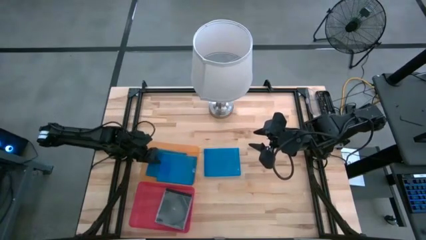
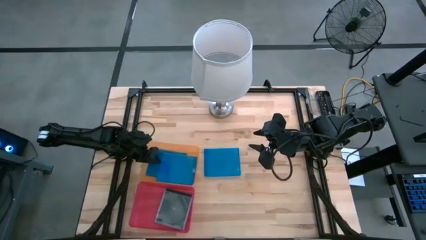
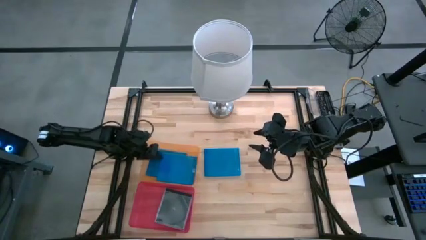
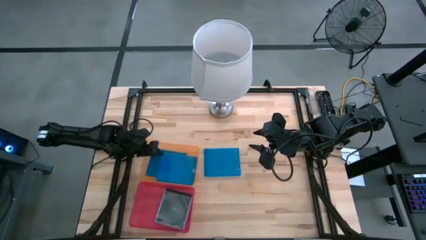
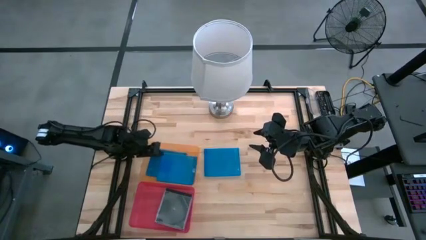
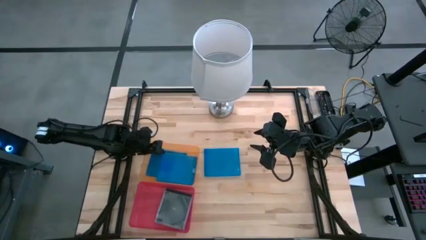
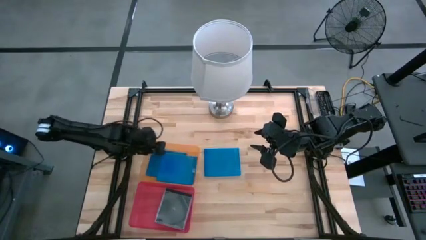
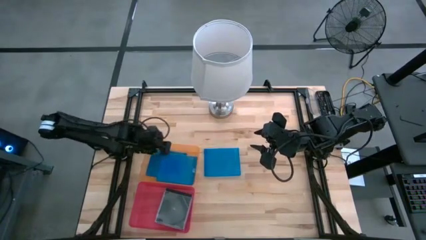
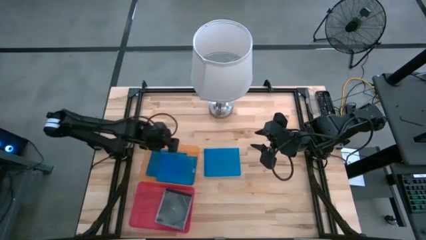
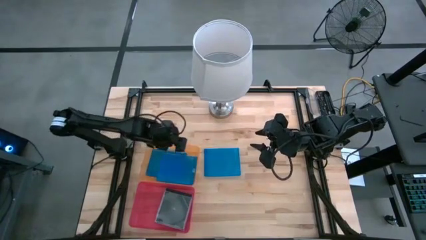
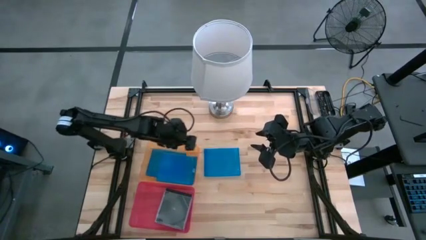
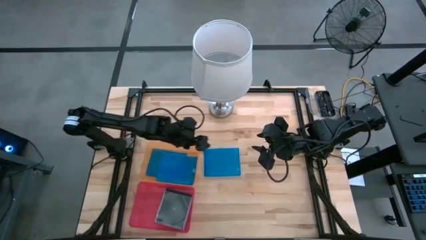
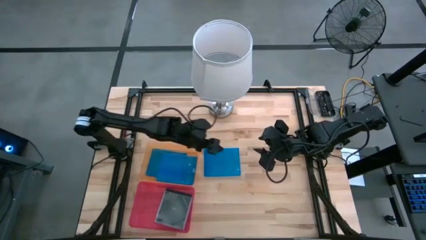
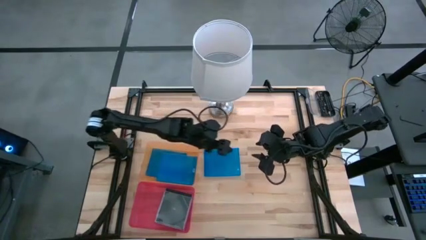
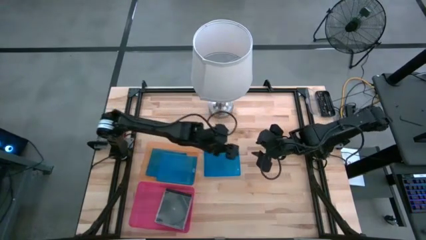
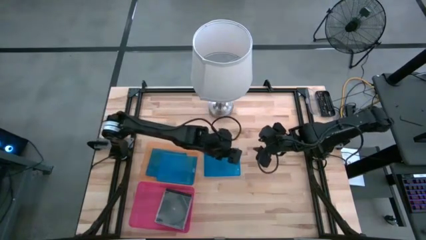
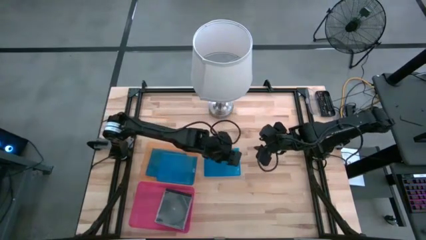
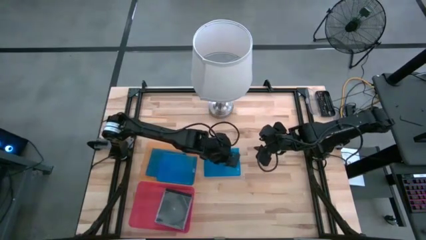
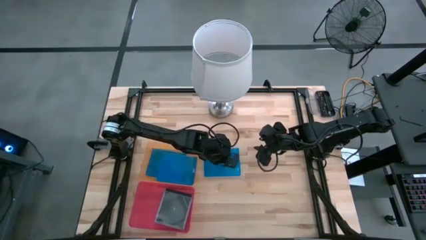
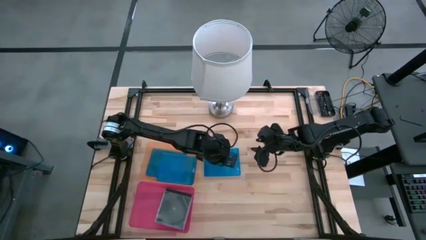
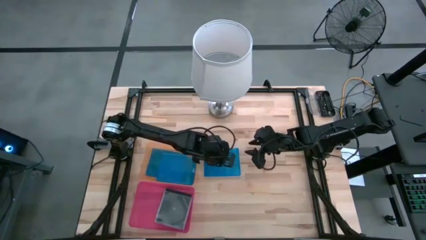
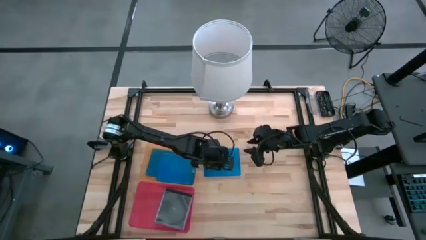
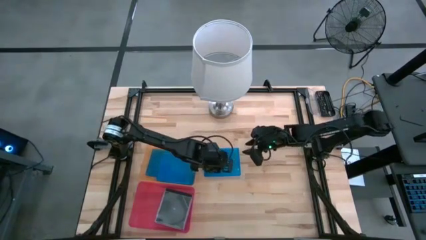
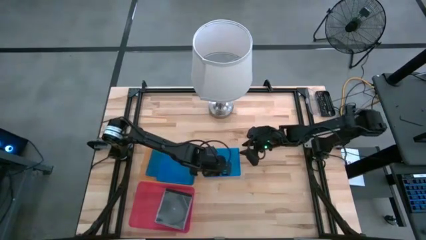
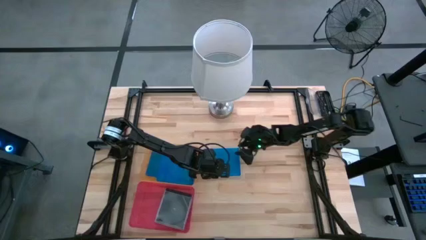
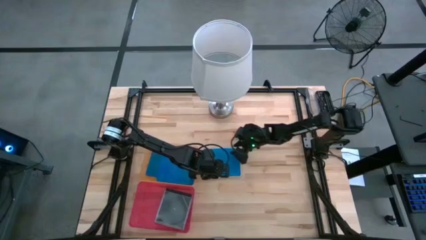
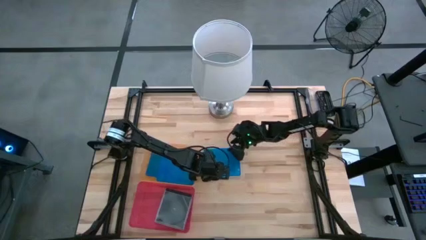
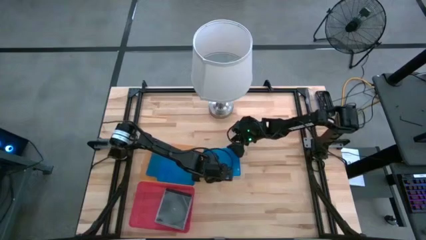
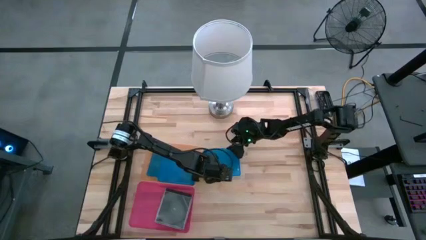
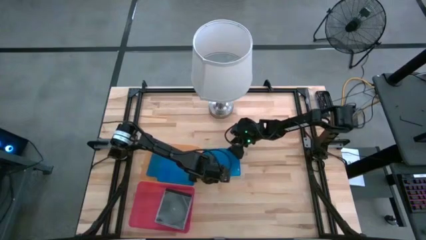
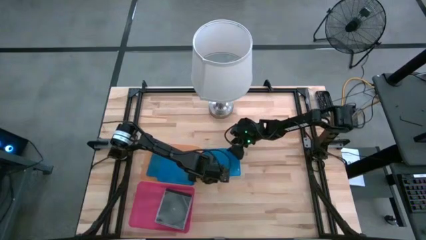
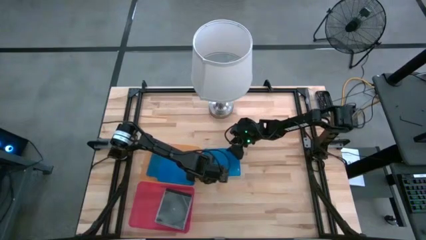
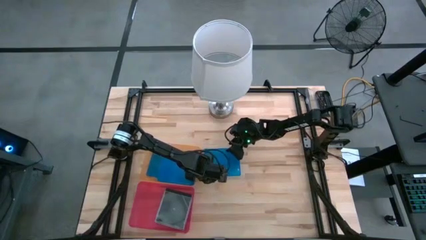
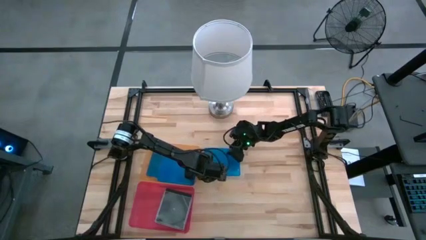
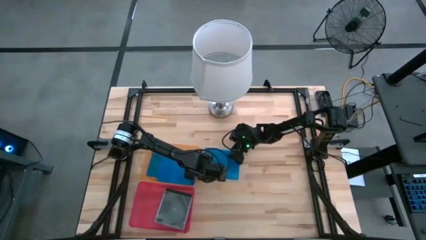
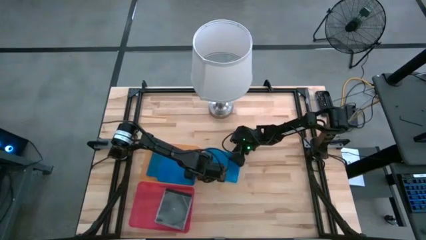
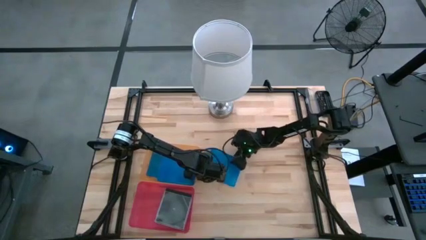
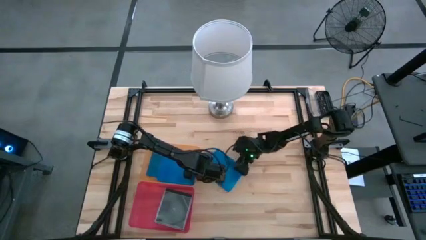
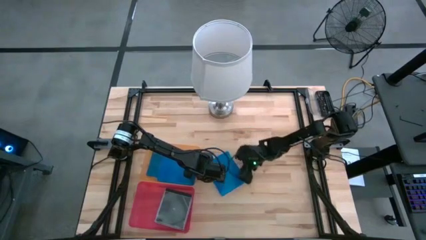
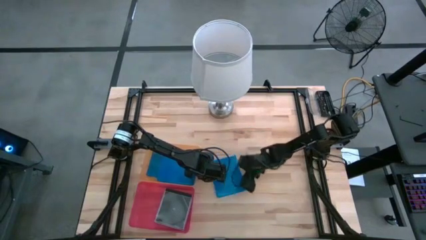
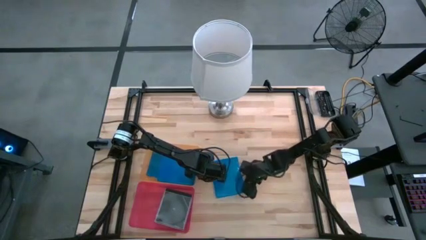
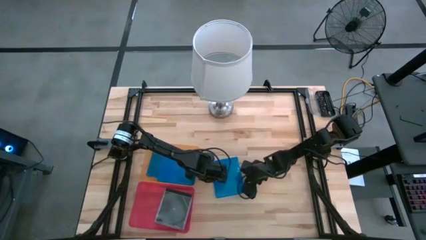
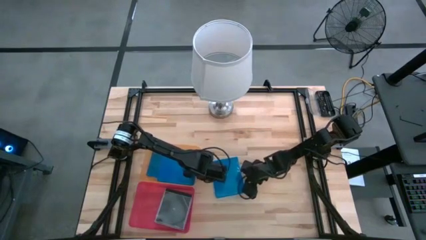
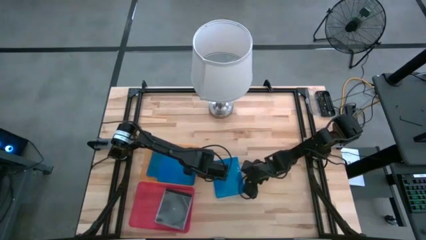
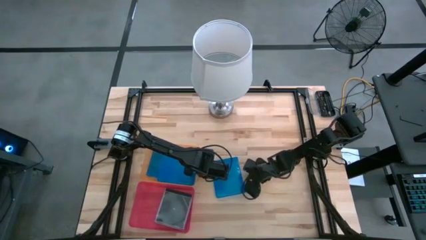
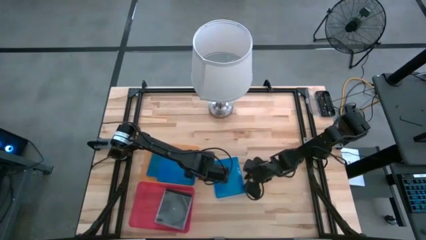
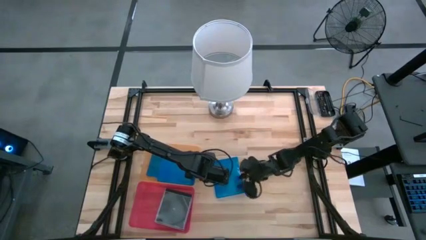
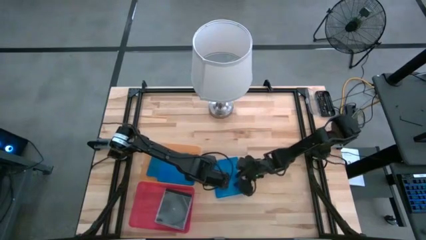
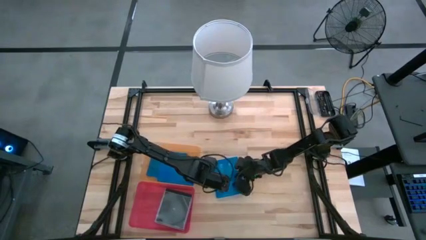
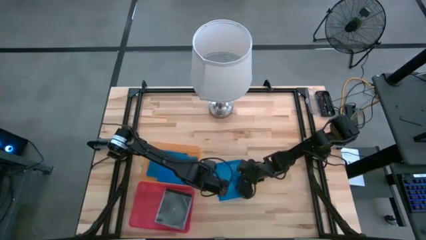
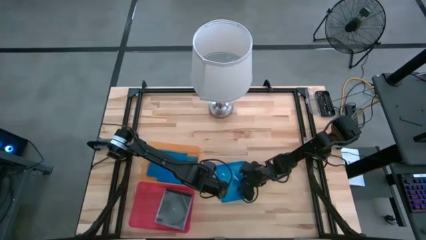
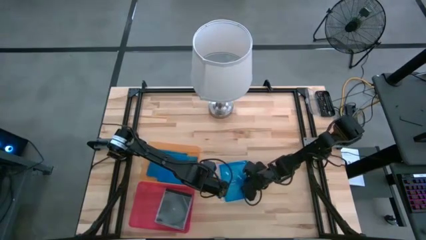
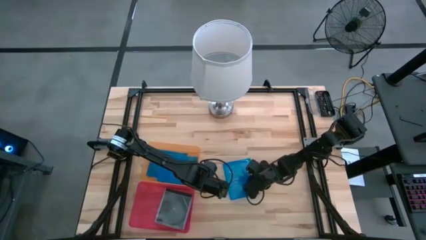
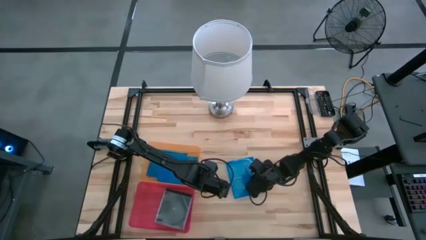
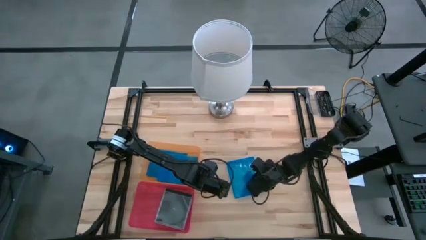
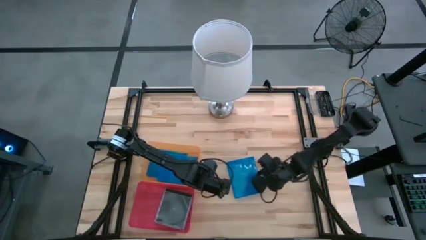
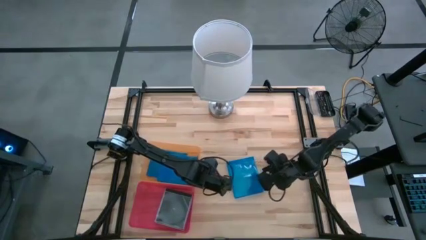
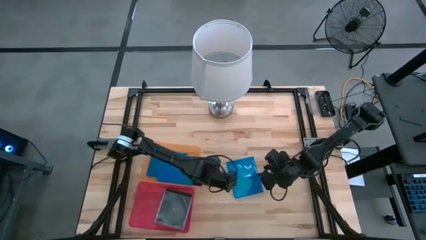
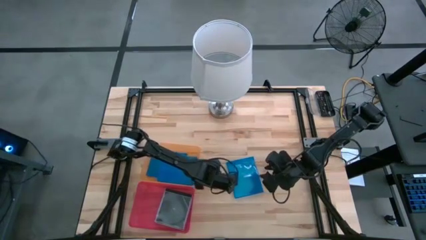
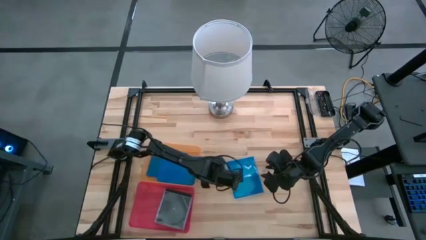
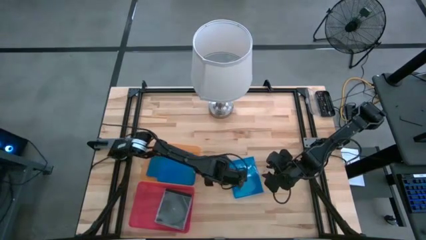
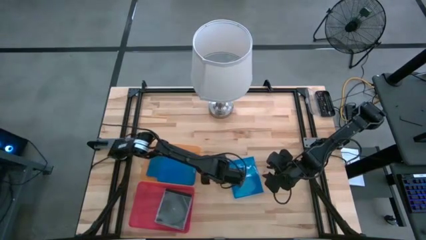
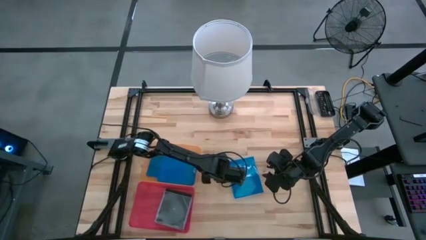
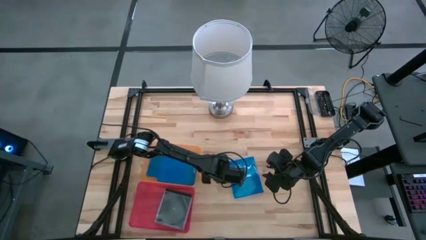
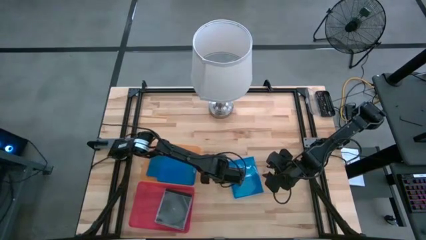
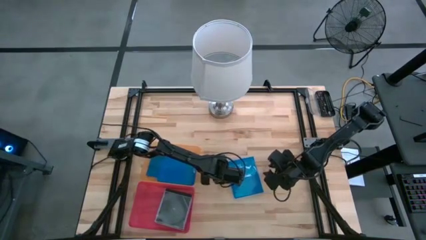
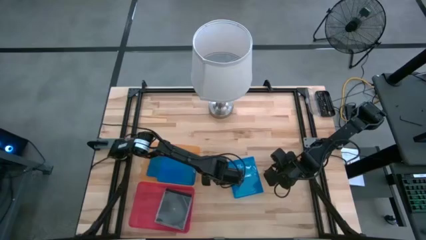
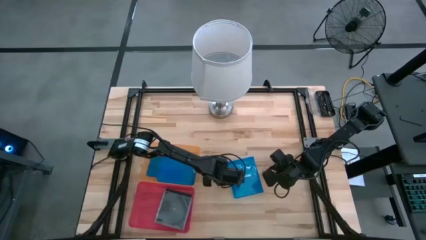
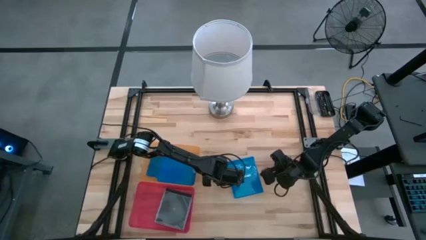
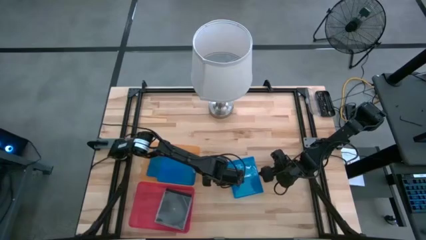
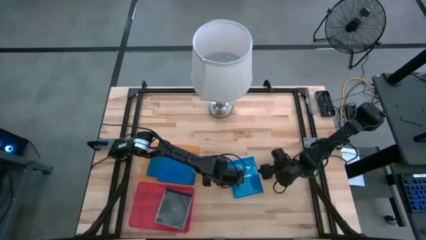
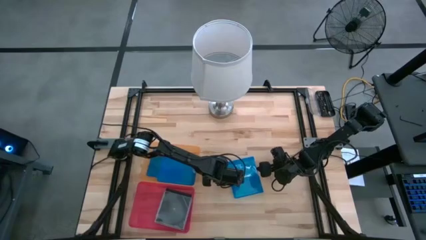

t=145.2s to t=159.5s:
Task: Pick & place jewel cases by type
Put the blue CD case into the orange bin

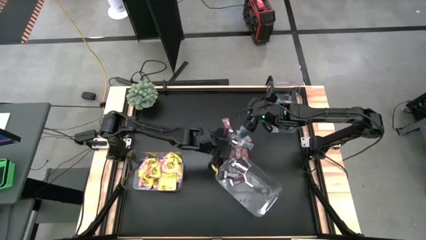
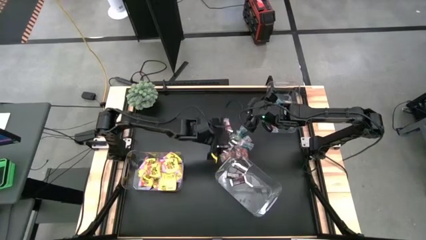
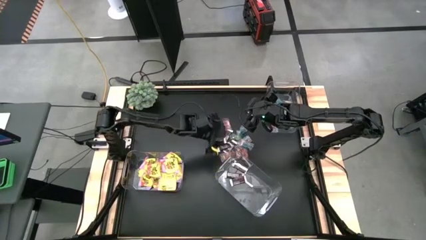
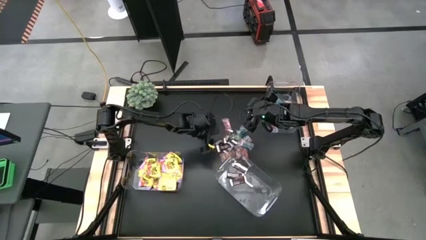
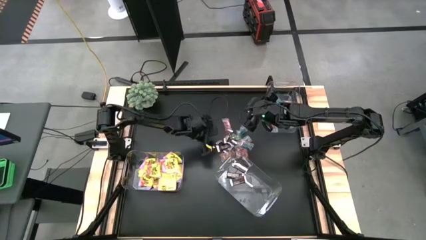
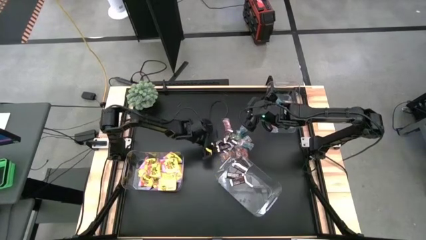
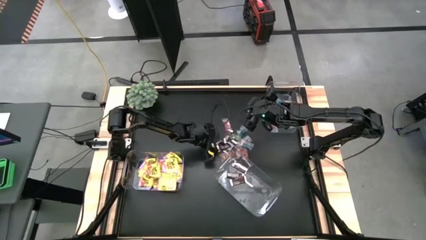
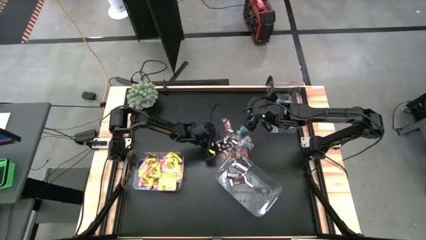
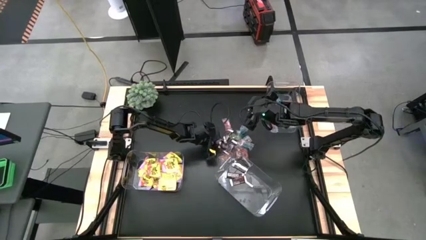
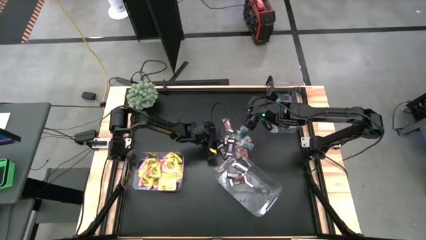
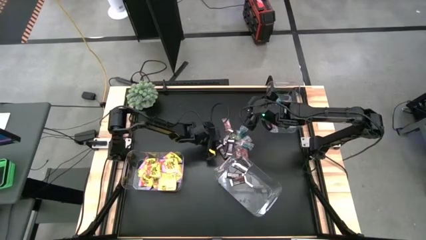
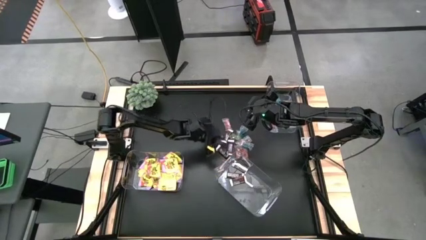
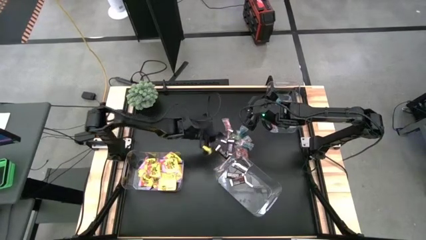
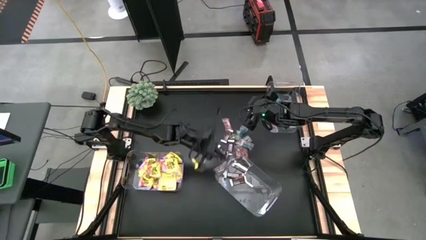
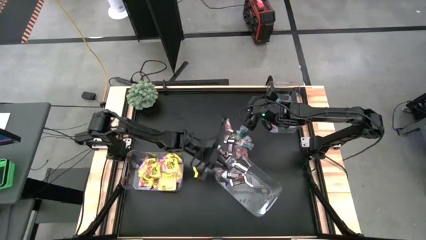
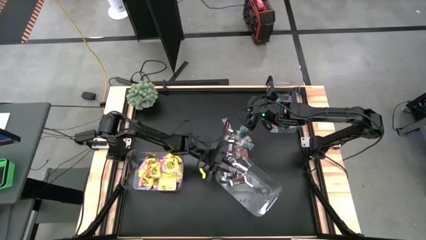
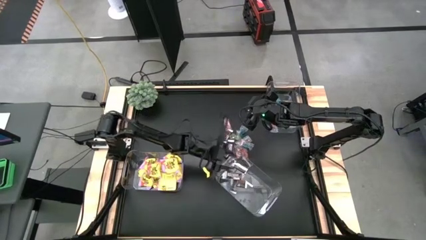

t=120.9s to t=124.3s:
Task: Sort candy
Put the brown candy in the bottom right transparent container
